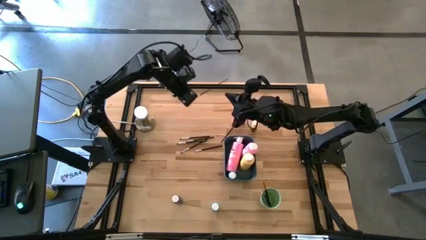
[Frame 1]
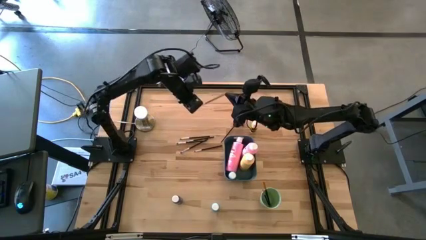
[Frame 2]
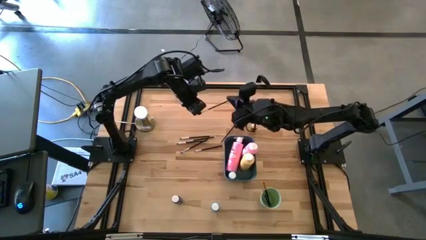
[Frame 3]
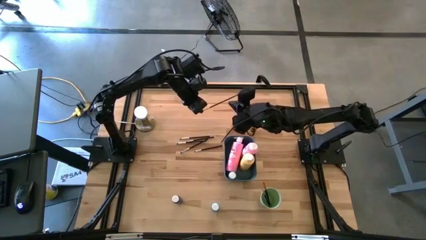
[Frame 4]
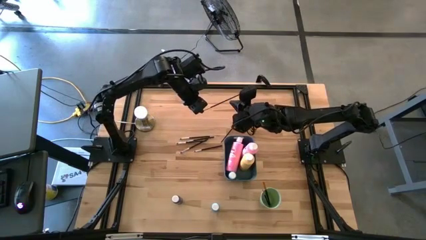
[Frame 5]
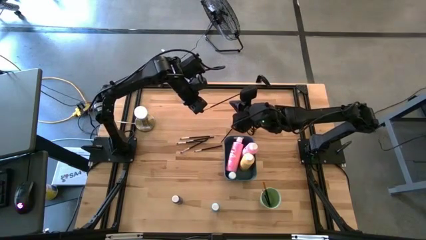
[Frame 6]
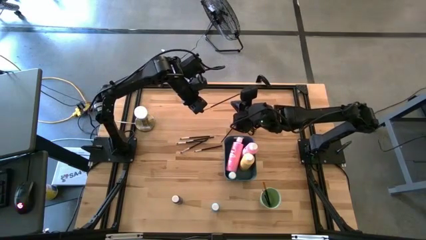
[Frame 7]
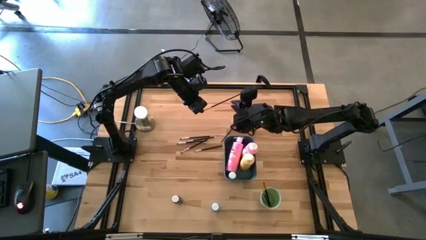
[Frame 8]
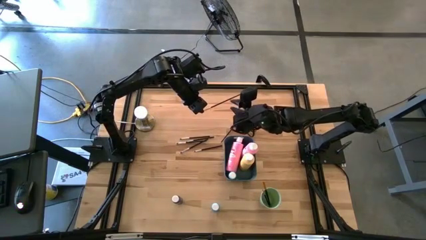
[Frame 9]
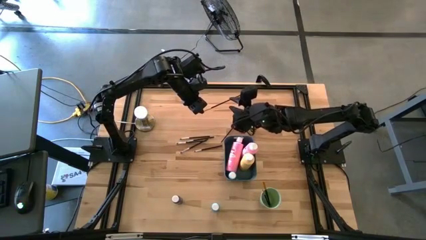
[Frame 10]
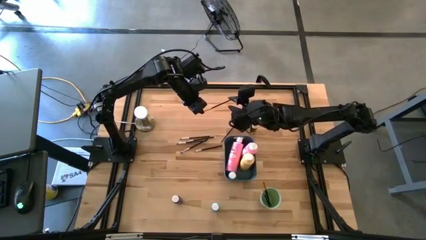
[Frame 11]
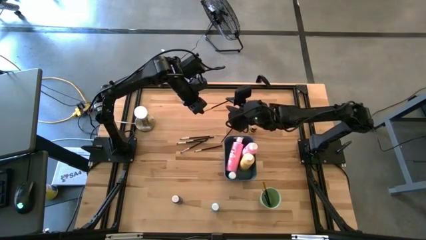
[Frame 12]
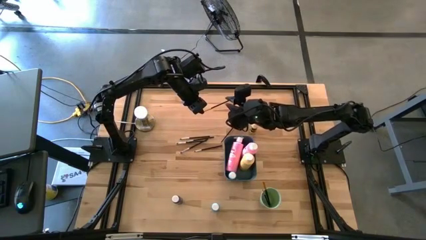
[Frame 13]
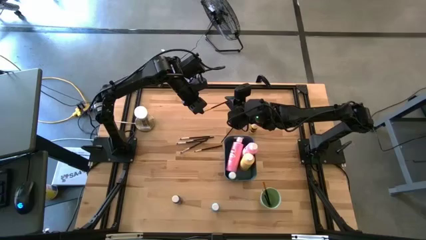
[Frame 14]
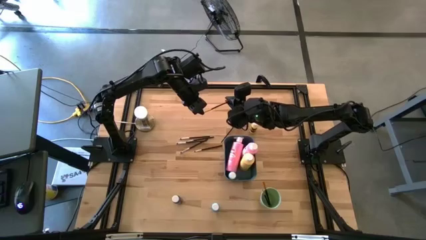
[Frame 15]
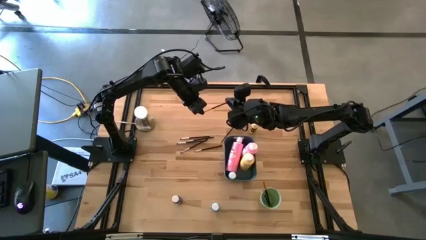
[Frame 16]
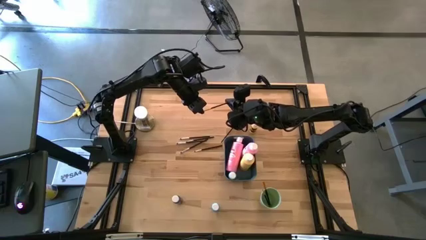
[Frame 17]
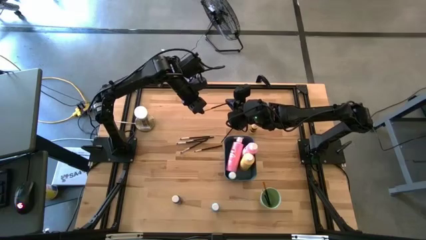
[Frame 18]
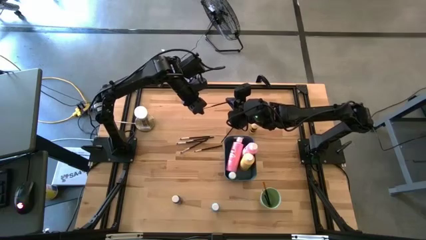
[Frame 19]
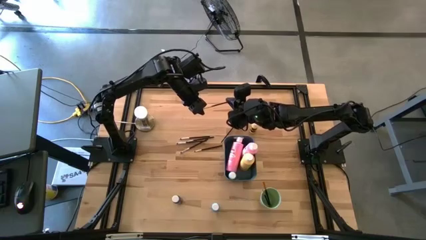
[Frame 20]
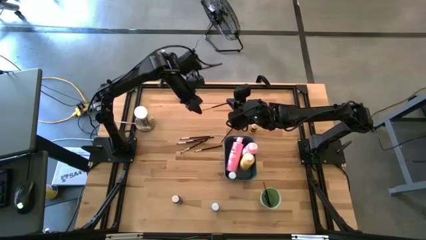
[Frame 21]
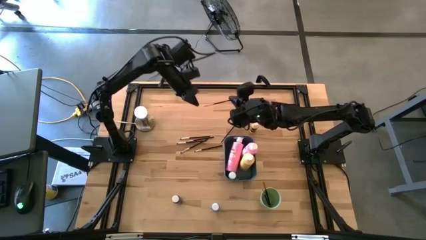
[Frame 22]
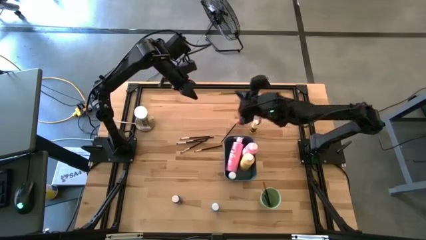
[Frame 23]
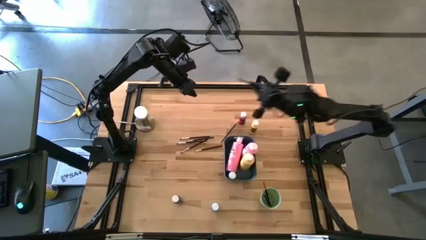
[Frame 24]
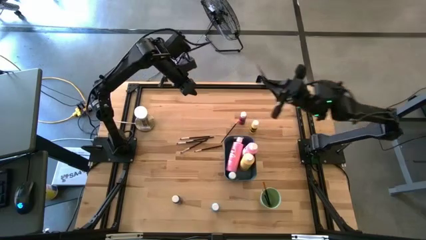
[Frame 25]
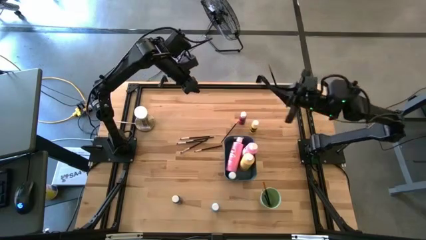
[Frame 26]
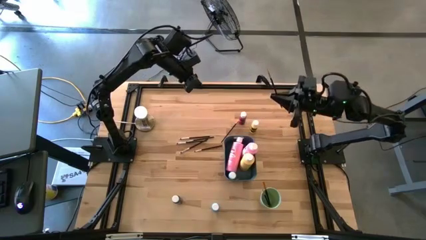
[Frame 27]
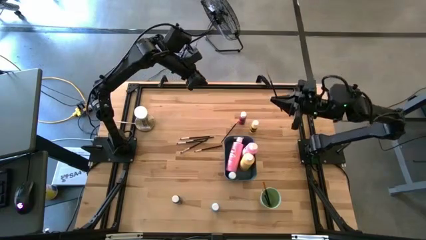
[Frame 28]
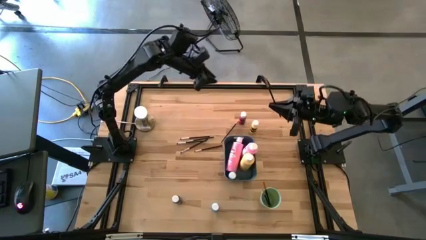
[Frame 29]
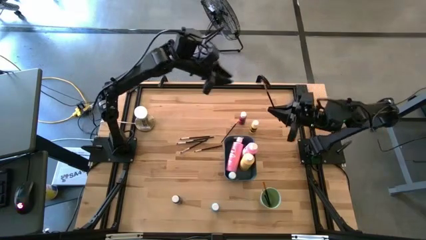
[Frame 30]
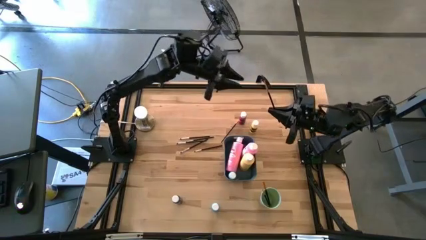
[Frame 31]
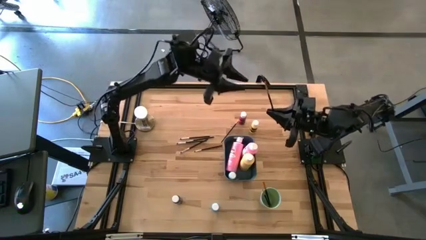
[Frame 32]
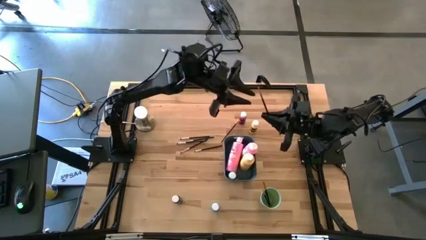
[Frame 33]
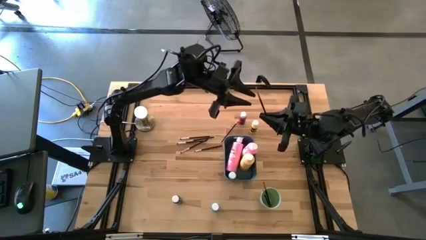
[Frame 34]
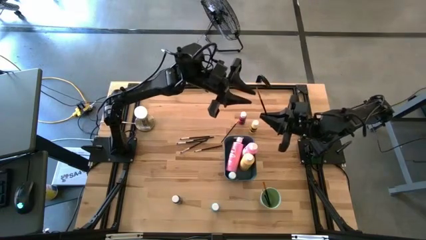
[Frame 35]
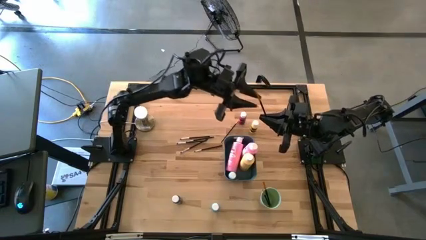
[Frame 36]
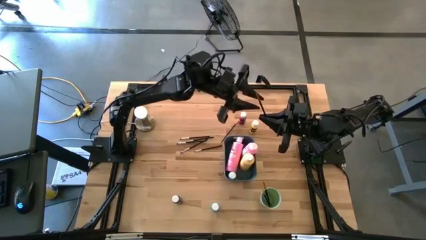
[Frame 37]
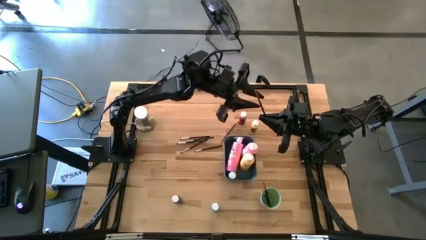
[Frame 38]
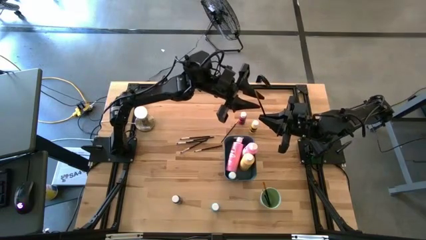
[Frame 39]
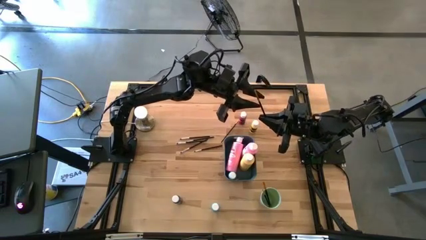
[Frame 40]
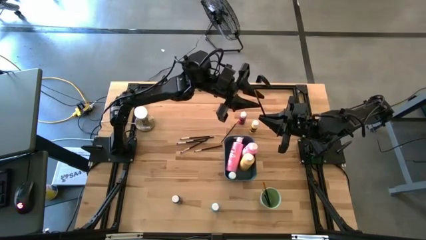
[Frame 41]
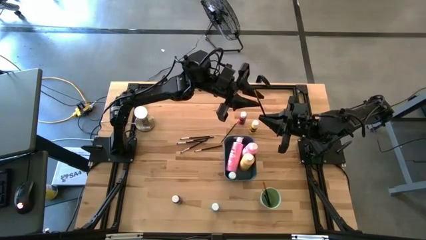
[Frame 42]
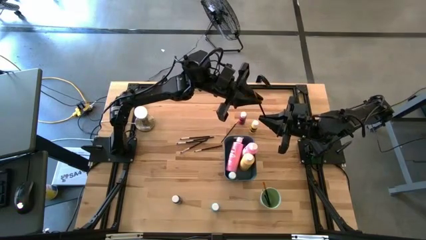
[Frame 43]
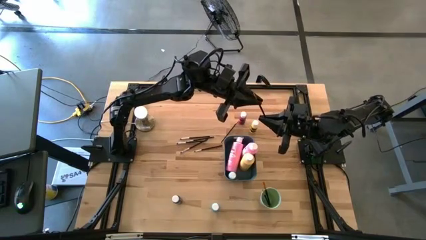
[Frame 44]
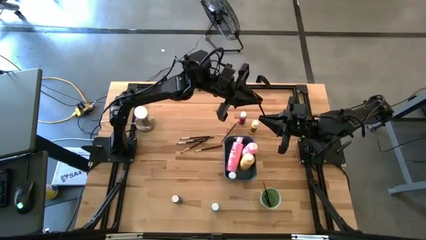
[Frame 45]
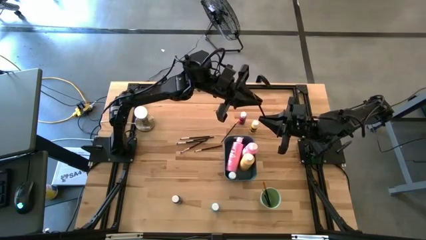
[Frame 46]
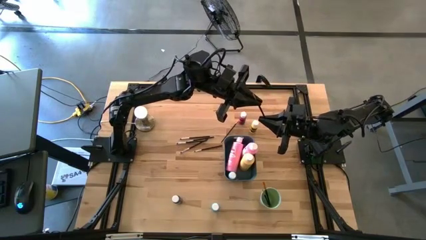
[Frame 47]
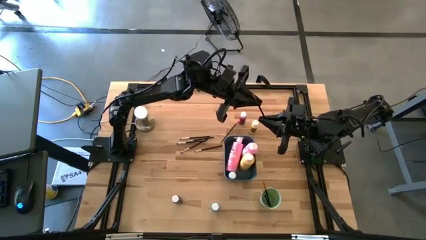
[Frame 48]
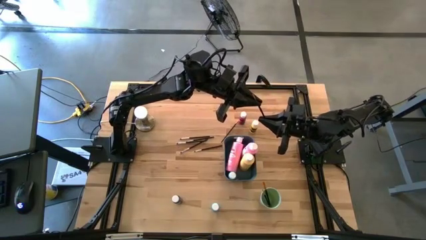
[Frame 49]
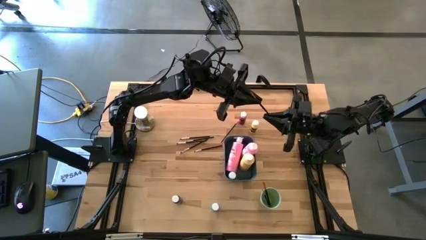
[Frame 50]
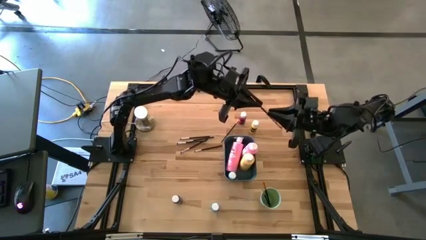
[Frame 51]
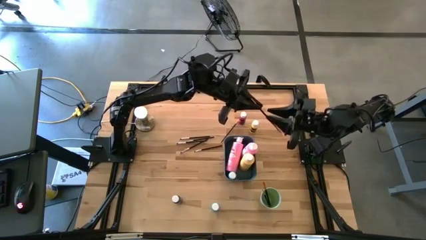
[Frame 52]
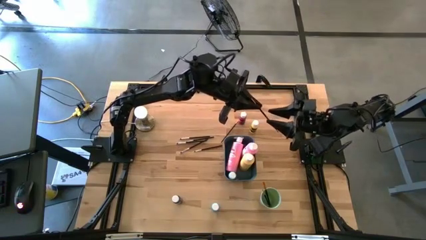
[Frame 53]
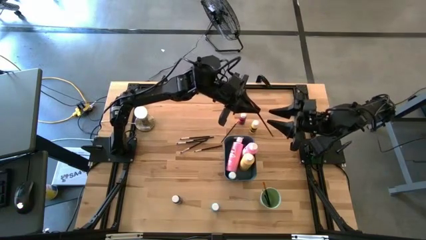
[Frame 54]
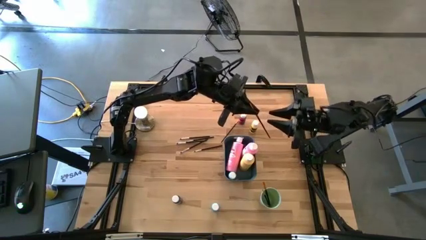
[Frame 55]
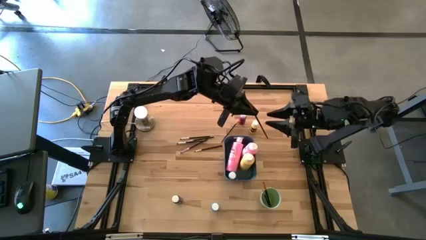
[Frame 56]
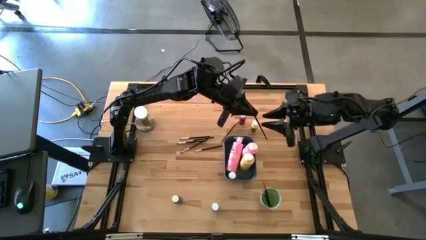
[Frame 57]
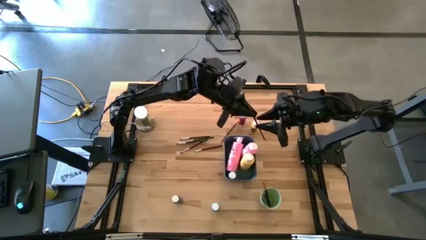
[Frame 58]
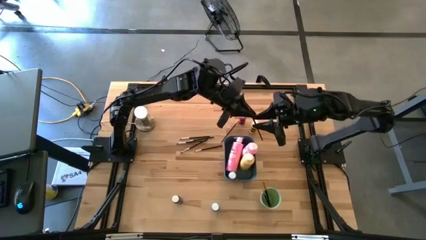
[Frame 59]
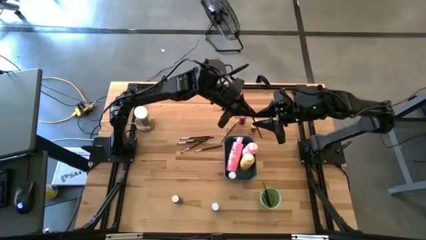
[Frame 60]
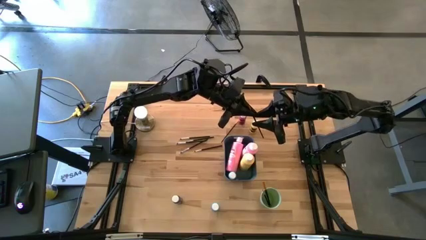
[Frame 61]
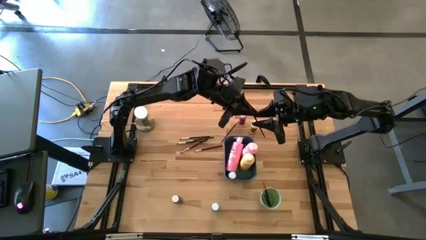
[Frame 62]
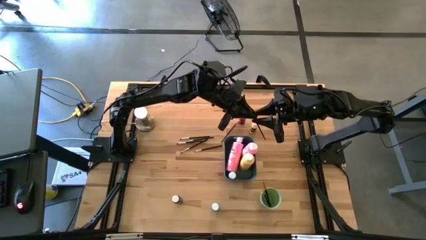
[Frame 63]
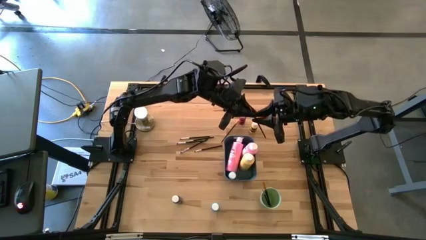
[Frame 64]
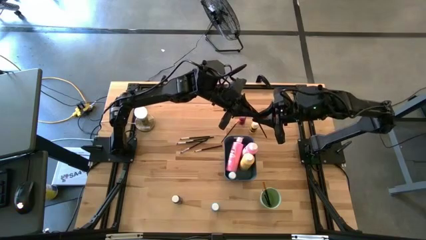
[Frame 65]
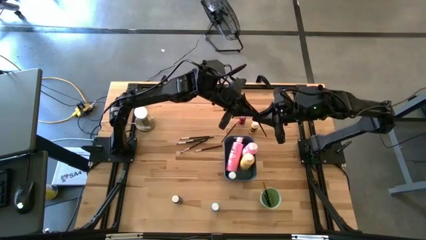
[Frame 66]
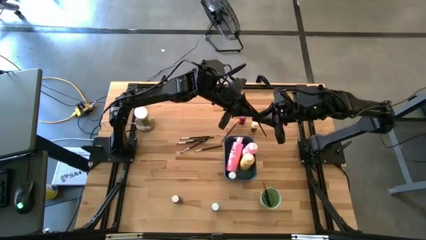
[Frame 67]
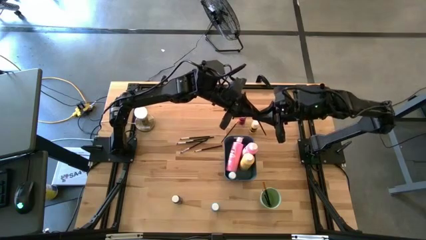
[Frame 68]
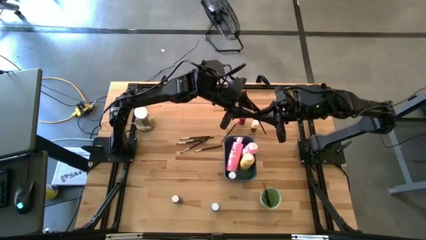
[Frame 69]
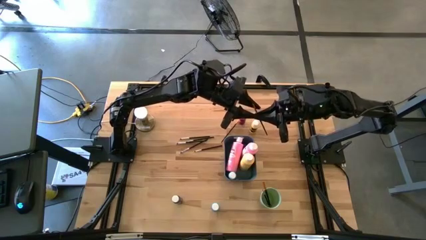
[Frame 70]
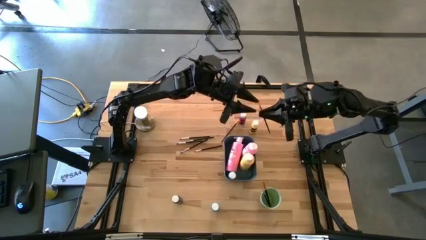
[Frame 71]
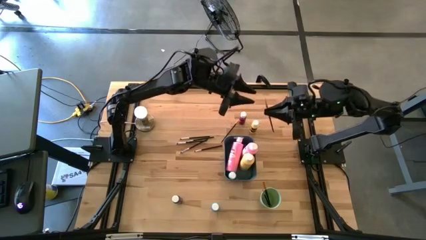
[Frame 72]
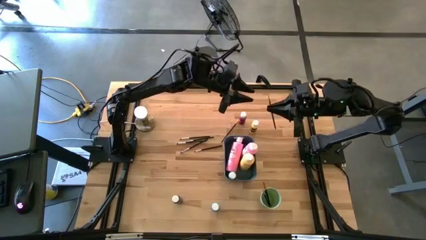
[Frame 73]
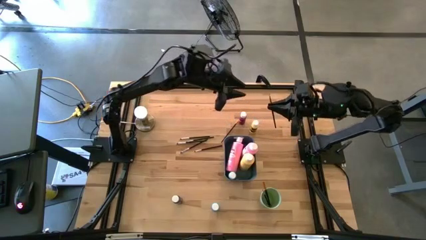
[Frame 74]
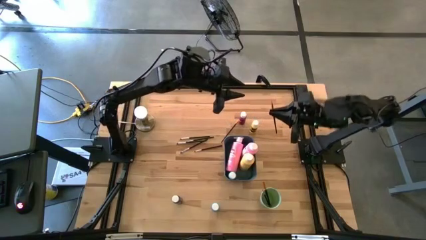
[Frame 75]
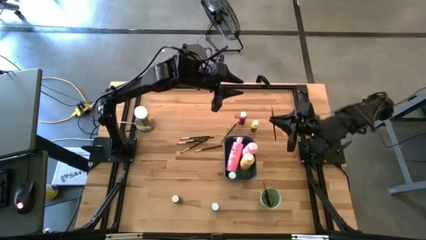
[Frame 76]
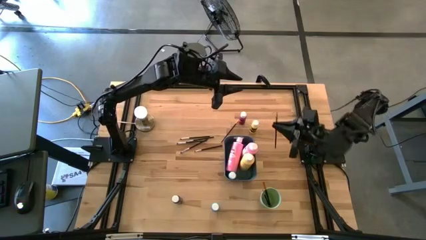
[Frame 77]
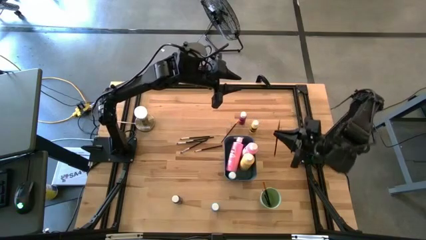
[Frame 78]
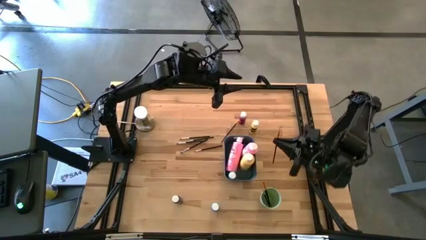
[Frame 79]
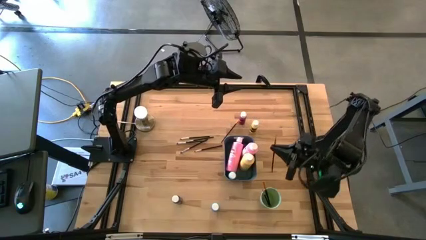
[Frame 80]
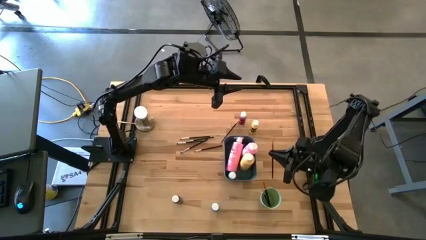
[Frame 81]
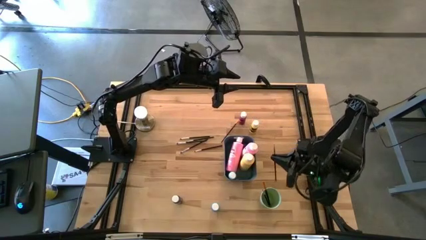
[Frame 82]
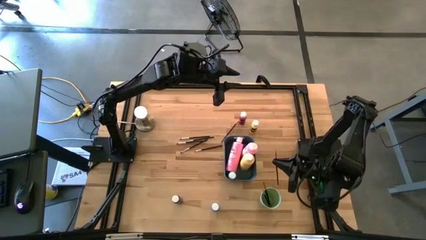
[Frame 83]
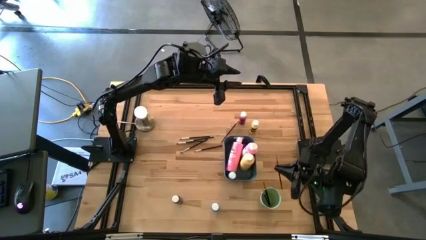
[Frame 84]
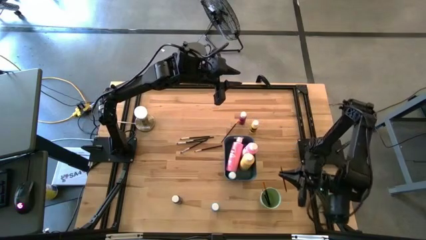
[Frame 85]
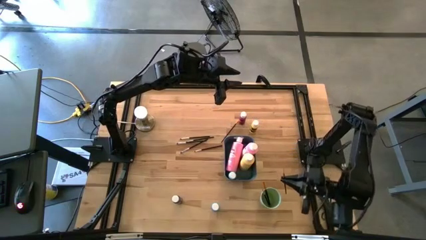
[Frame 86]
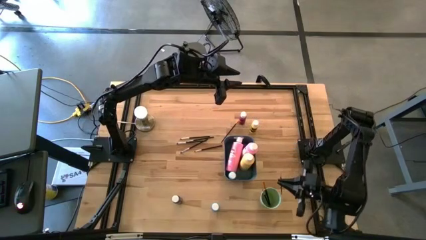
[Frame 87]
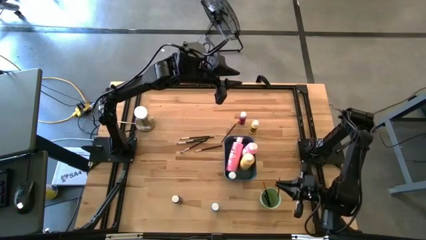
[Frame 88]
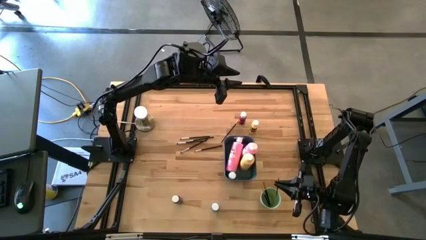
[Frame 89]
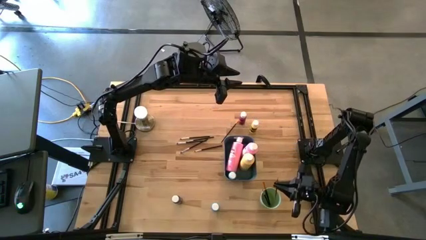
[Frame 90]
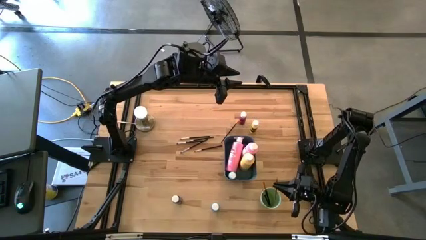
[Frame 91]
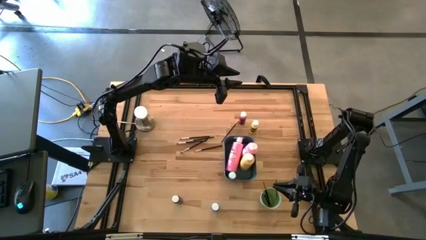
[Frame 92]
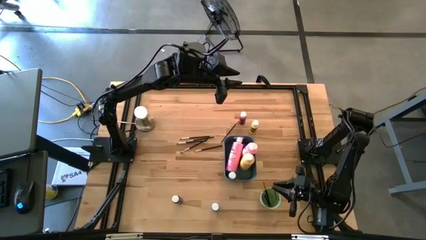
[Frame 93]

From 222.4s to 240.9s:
Task: Pick & Place Paint Supplies
Put the black and gold paint brush into the green cup
